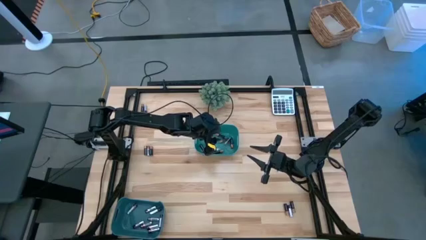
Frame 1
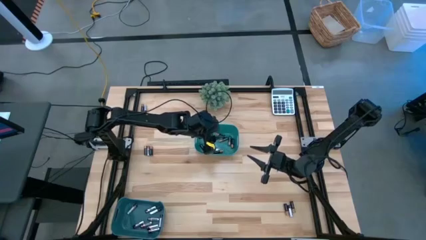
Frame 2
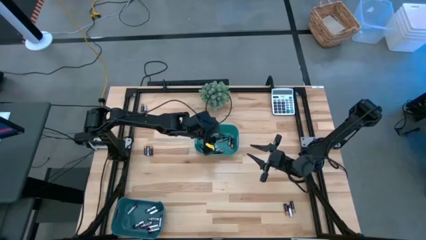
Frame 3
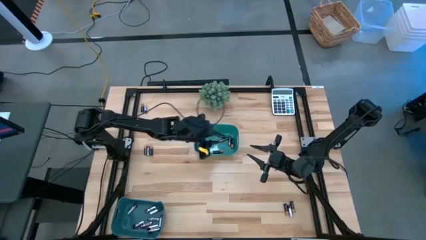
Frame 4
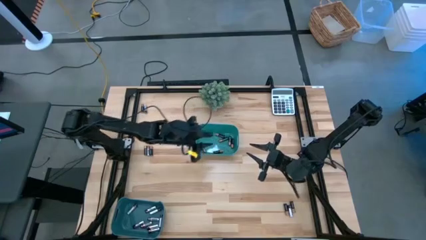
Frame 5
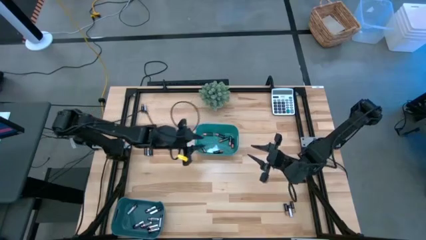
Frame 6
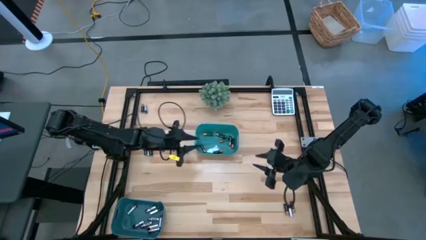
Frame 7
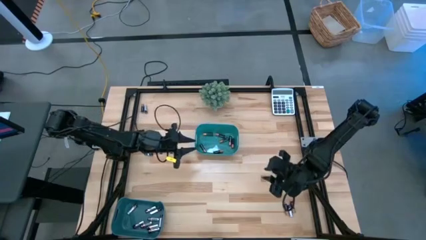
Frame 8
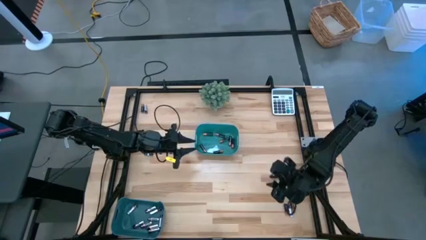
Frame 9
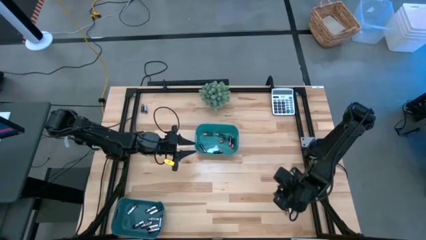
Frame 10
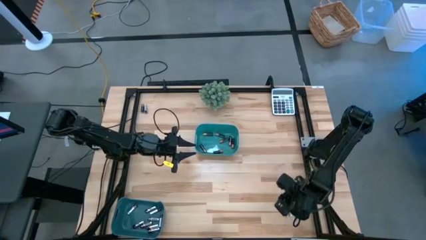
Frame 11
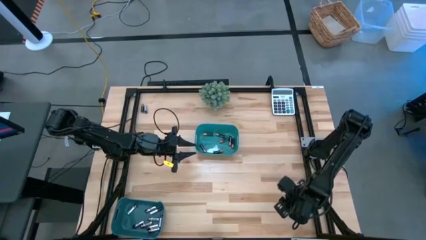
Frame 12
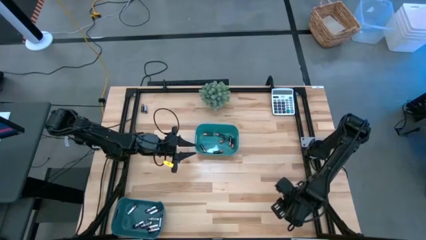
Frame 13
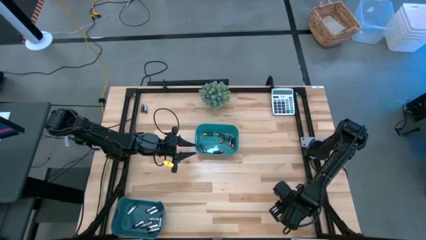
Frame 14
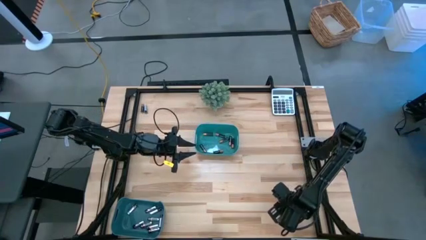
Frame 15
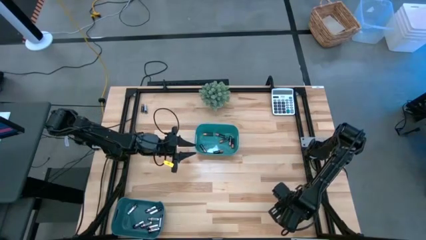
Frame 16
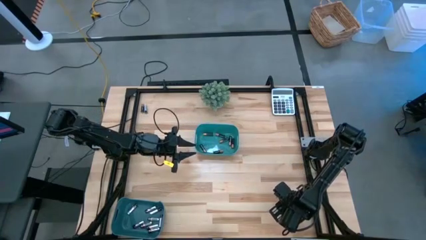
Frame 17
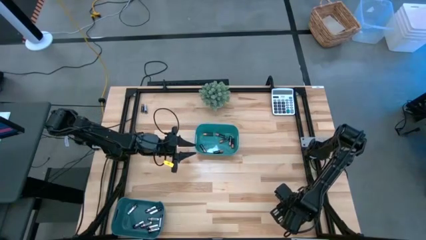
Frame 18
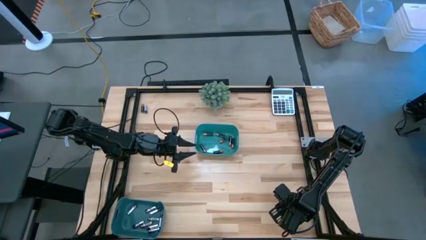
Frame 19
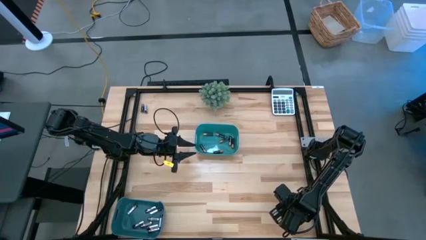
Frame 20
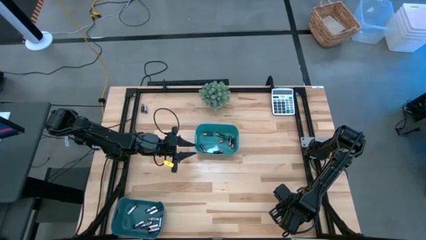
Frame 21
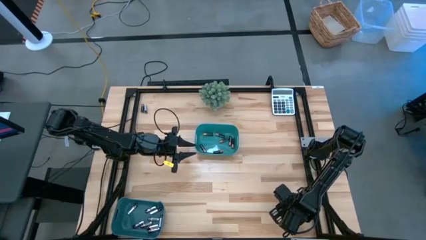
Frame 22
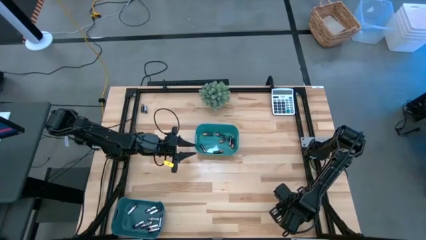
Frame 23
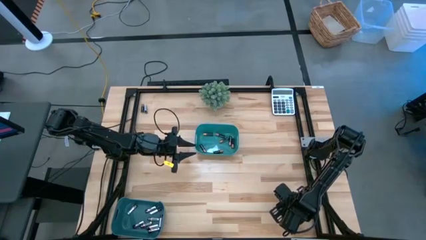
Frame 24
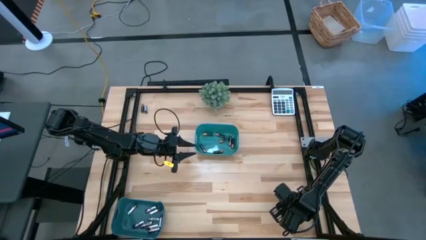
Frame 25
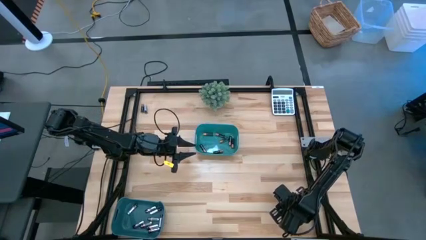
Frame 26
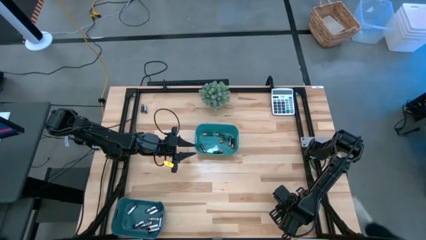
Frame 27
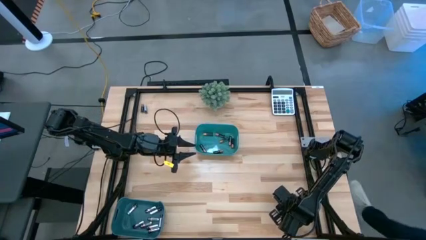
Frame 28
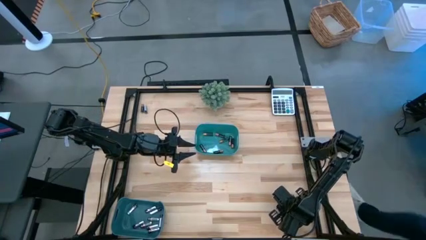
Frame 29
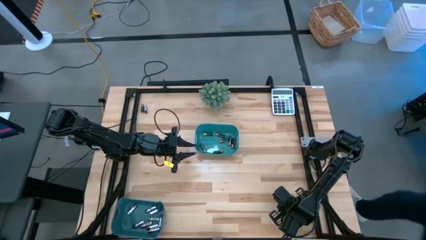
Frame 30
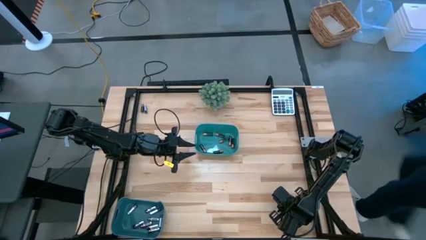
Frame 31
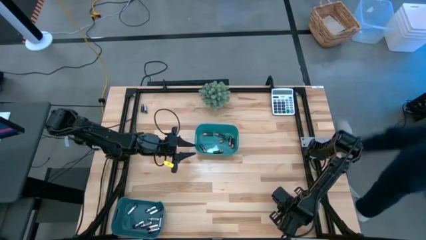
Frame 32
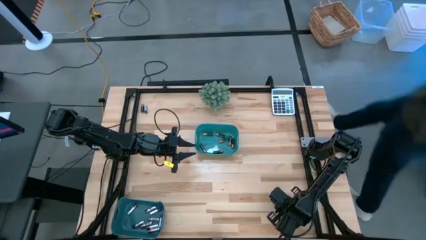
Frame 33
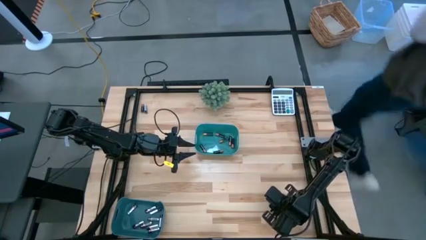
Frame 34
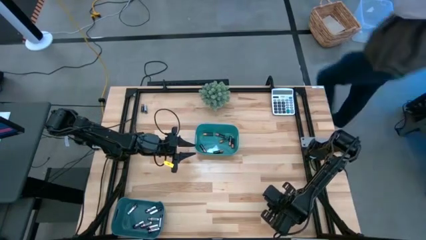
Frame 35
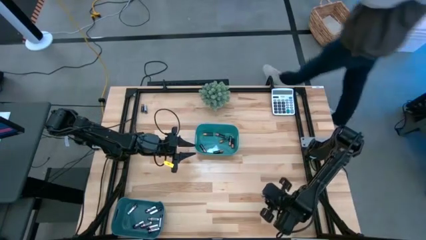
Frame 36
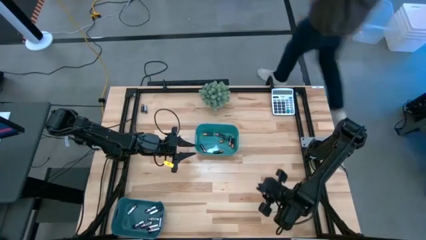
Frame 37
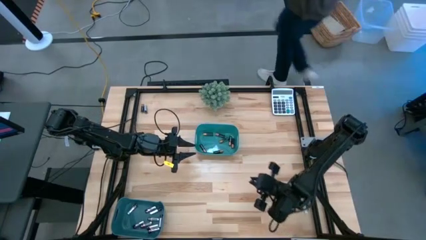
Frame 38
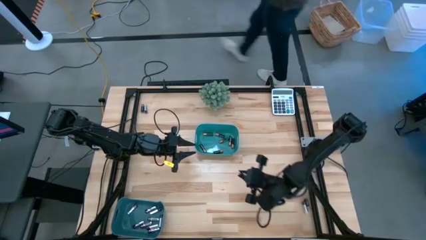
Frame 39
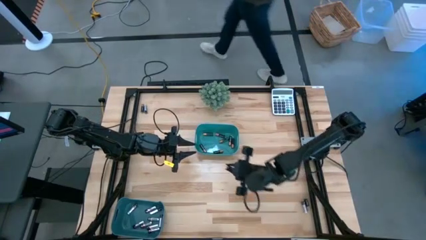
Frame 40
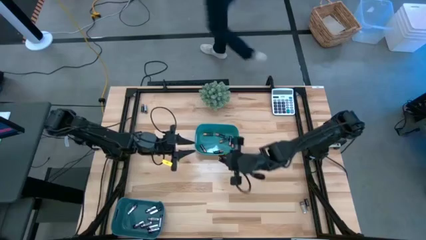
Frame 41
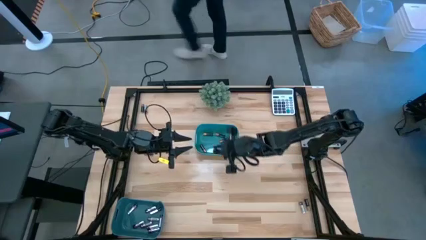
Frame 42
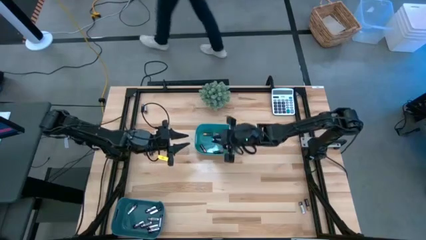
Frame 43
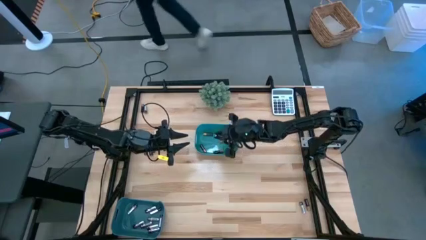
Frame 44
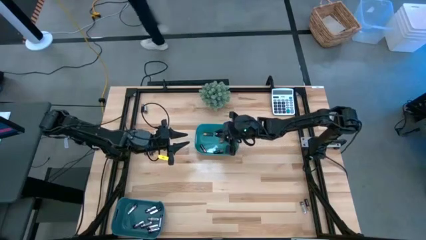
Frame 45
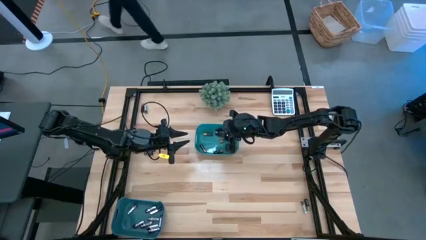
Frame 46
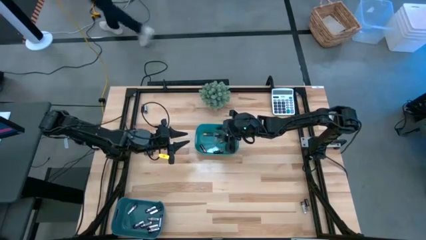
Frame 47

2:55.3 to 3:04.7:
Task: Sort batteries
Put the black battery into the green bin

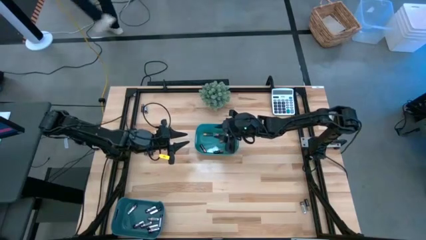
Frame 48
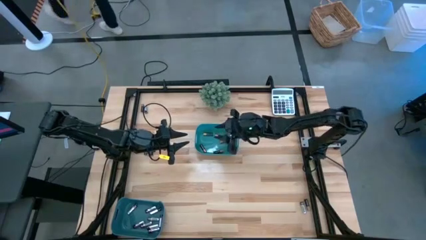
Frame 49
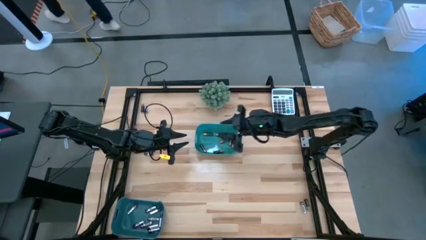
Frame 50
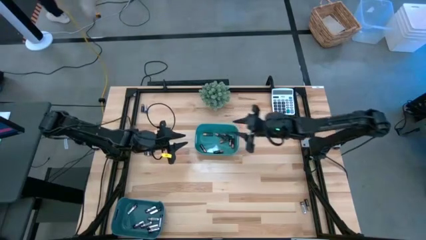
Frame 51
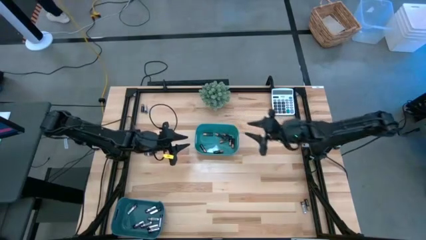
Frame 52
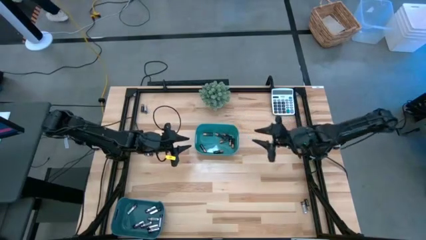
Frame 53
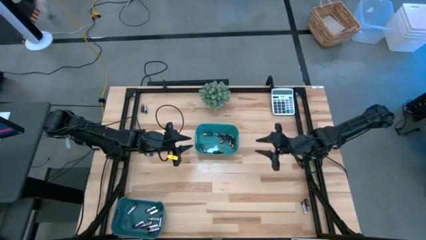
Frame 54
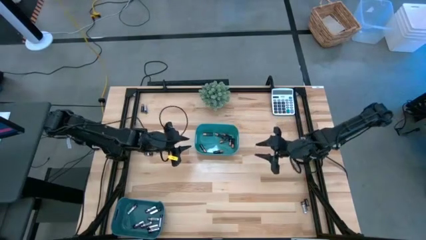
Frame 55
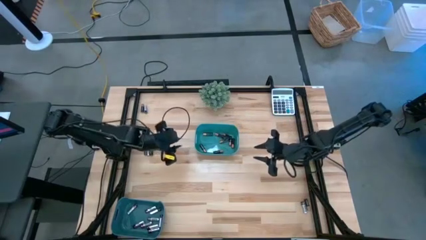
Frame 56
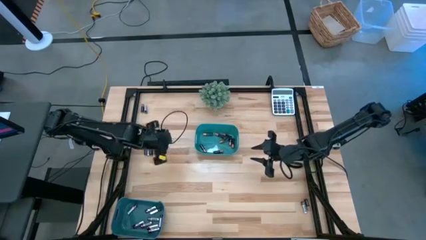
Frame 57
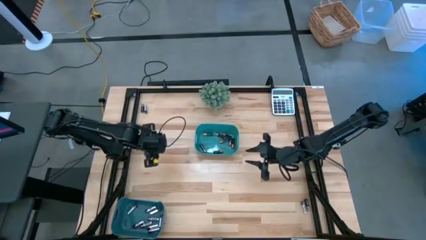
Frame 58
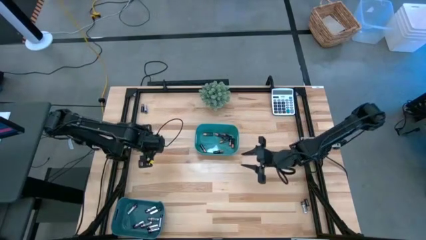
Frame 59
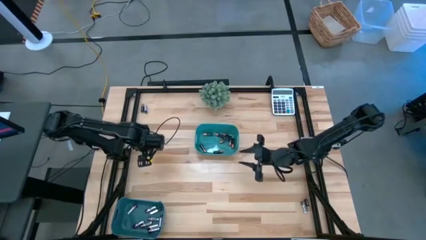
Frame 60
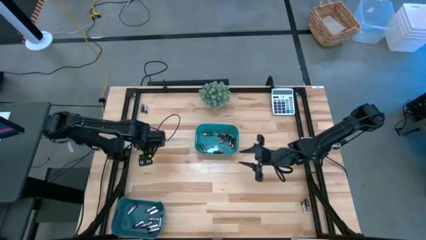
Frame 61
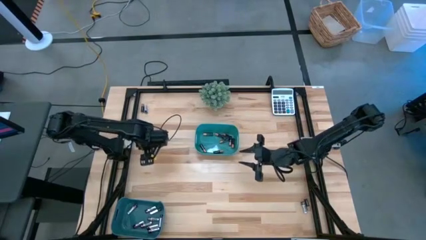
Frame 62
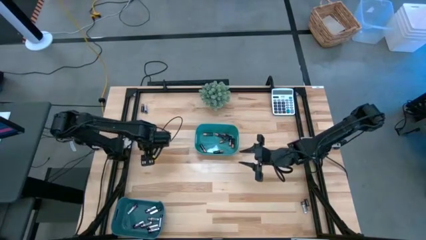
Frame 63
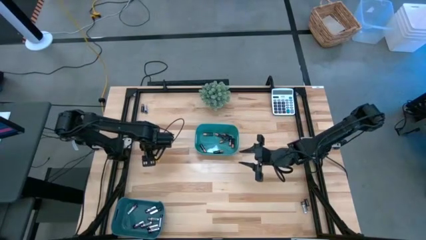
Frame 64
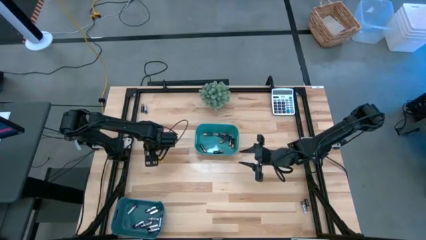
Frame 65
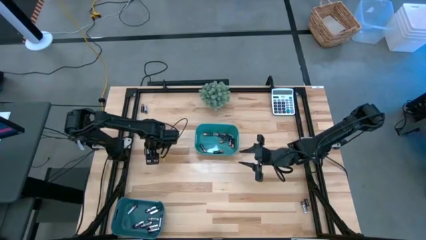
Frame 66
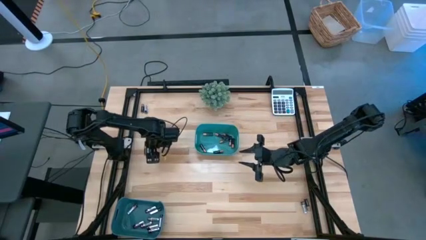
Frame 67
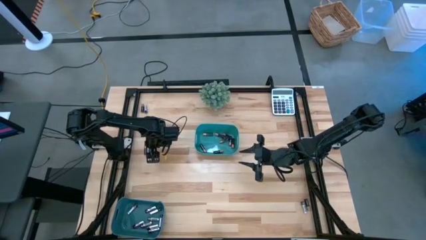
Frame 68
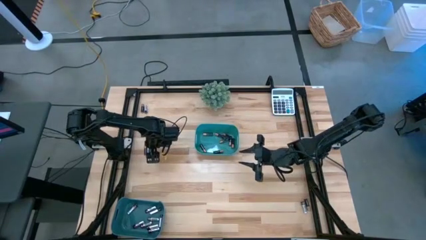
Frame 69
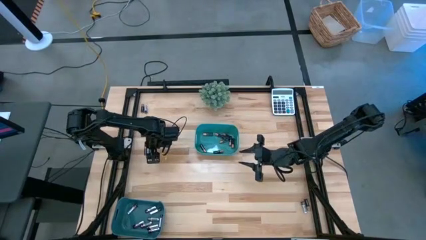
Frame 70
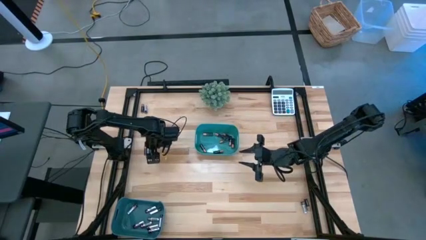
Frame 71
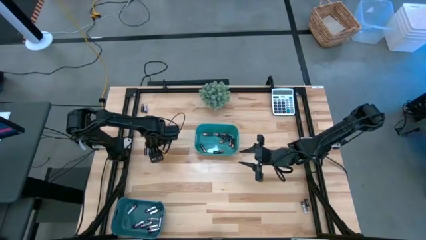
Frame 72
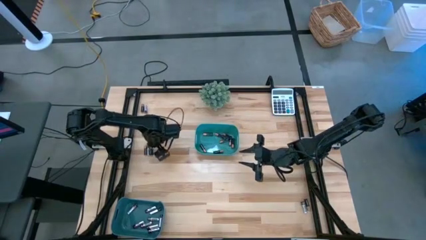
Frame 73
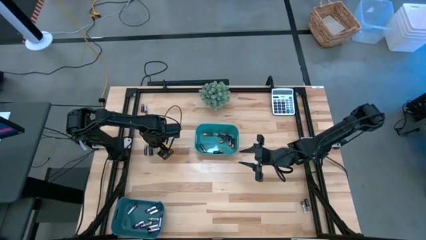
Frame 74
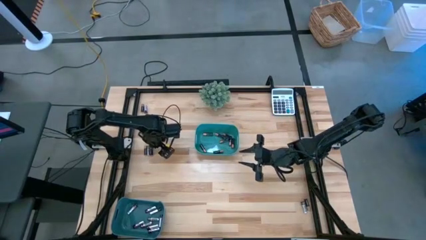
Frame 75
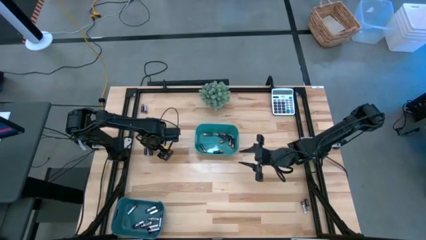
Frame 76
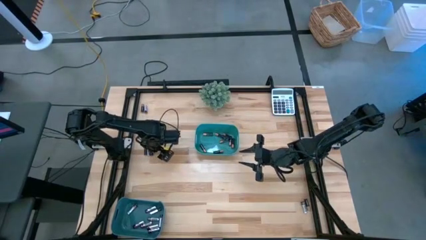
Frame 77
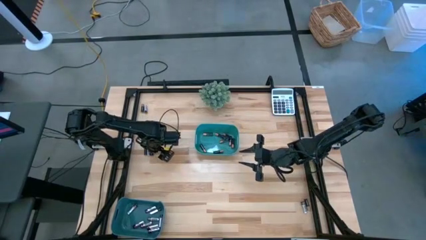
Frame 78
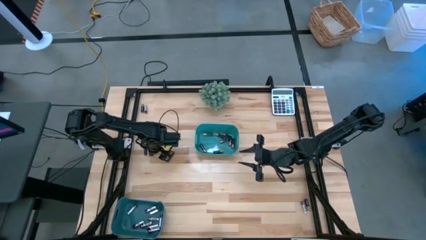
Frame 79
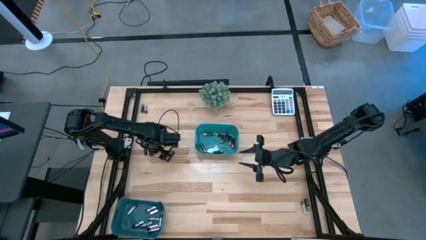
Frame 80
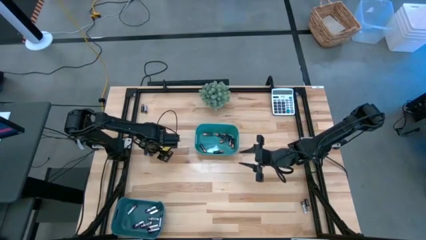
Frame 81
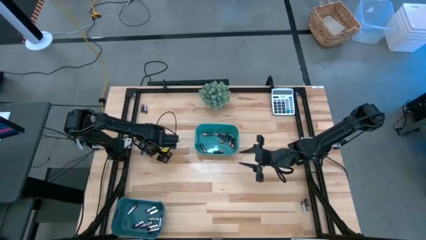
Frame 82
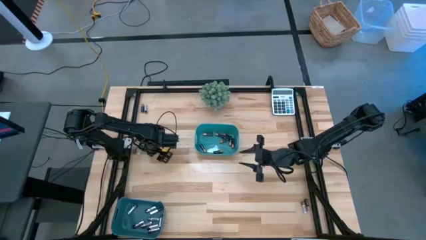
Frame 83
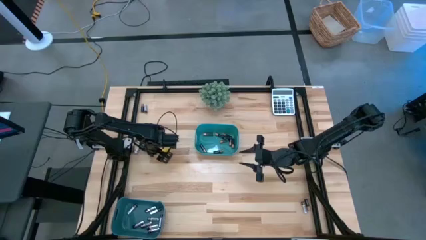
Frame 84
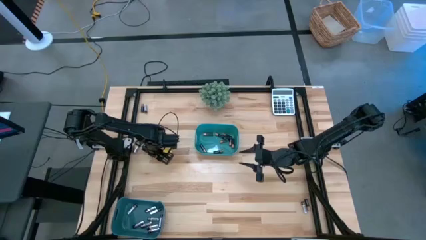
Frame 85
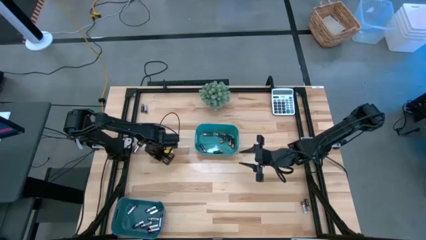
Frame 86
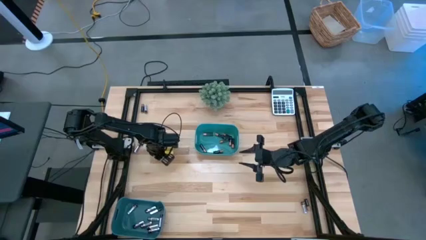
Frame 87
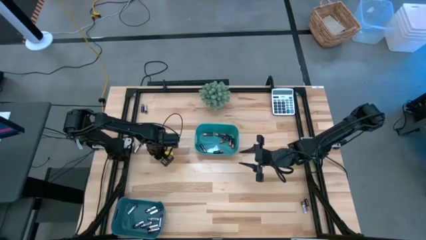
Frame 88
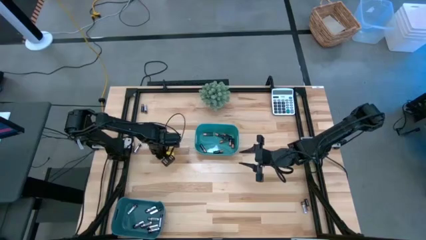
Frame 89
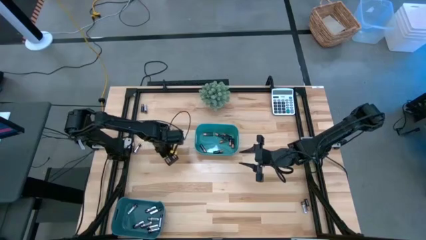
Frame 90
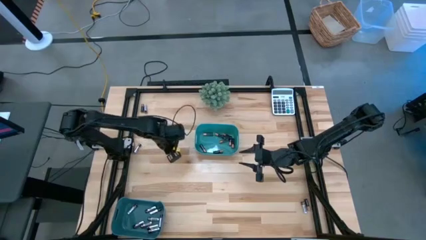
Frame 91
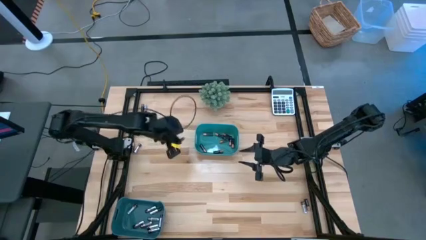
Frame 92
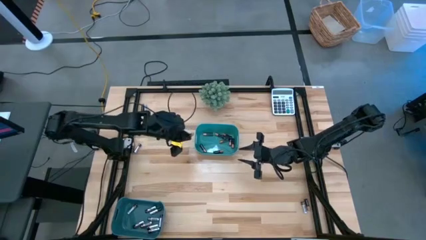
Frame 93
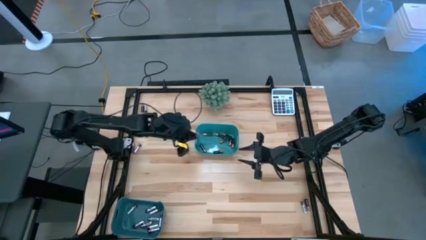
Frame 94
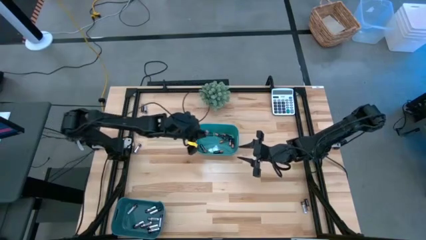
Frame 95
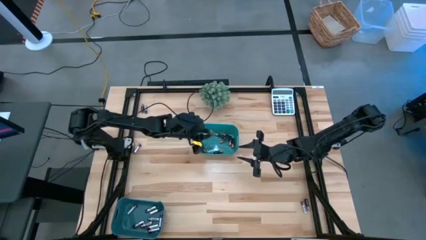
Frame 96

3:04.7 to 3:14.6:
Put the black battery into the green bin
